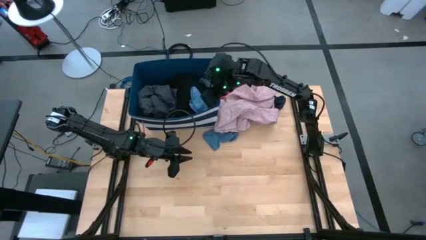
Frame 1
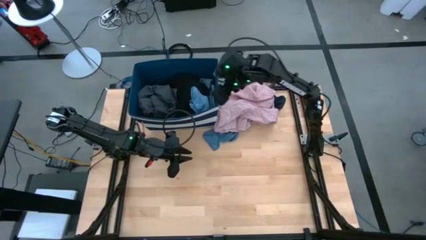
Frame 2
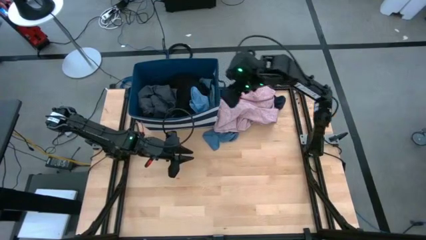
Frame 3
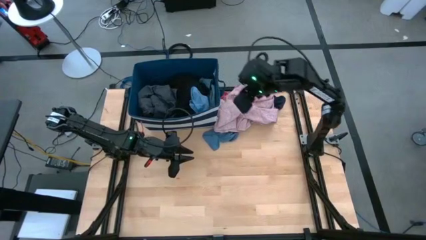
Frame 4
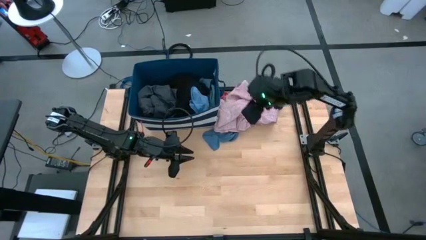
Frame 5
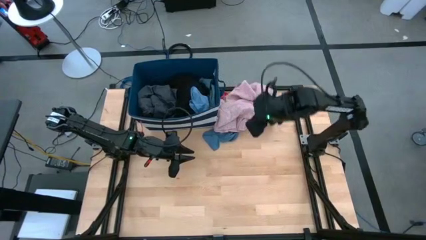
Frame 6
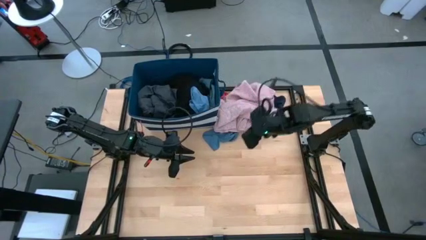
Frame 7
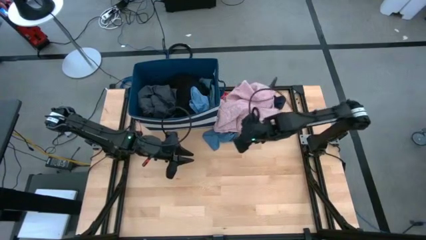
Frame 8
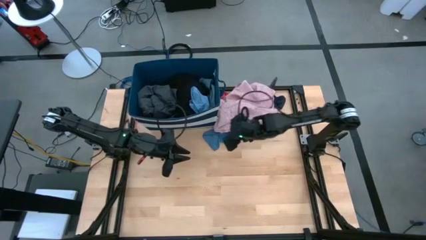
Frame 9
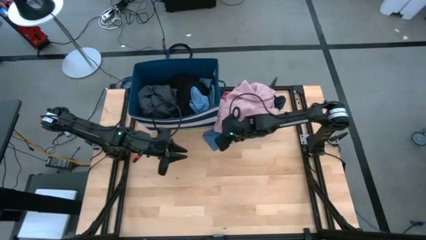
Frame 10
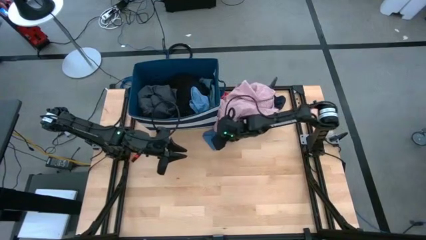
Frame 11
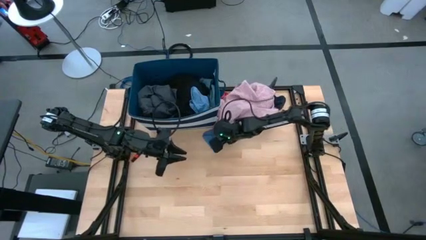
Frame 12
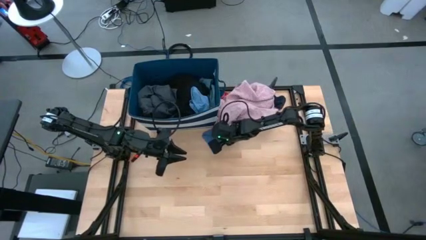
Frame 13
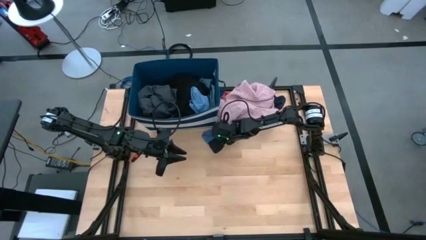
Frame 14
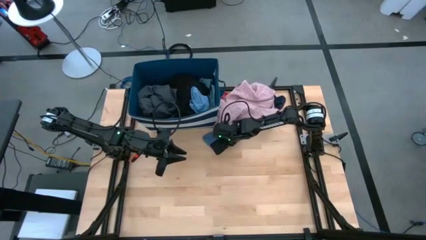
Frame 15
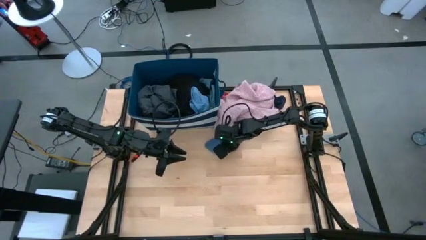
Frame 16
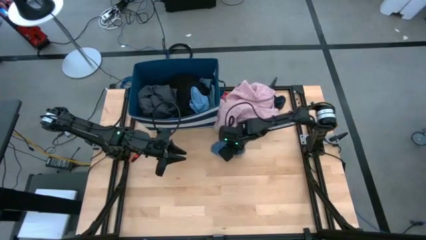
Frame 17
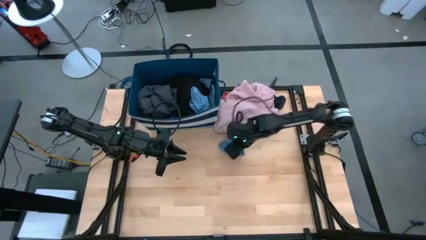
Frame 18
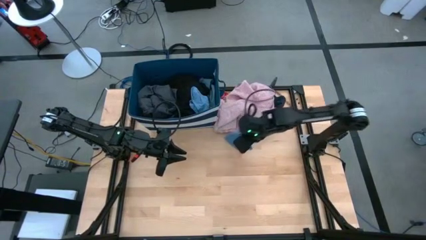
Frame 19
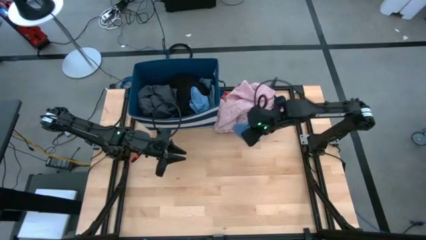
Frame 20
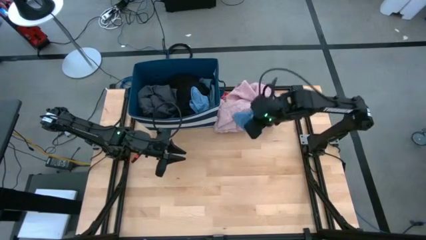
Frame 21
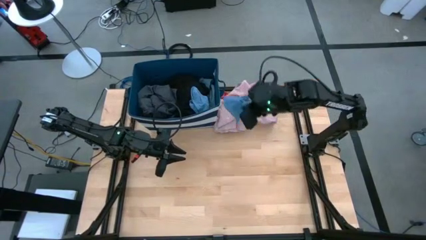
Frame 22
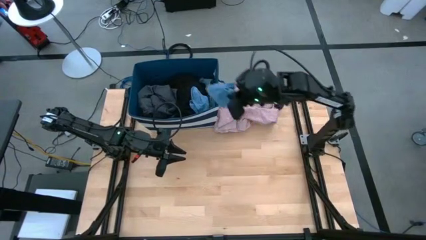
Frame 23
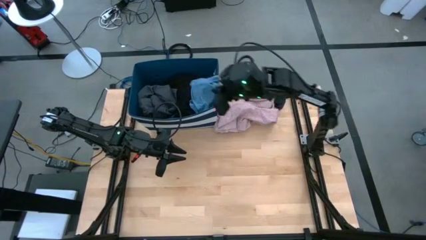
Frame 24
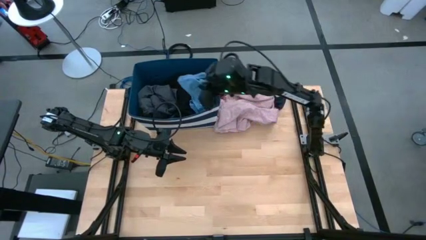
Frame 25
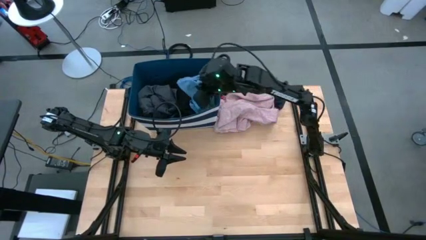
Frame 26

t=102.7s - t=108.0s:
Task: Sort clothes
Put the blue sock into the blue laundry bin

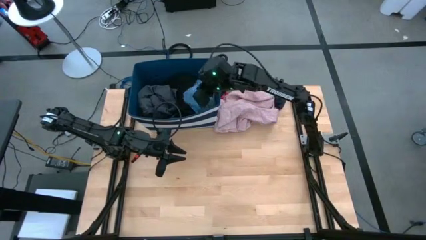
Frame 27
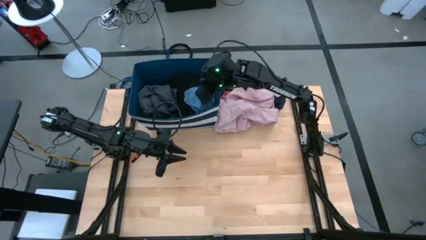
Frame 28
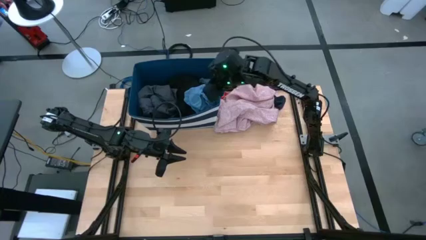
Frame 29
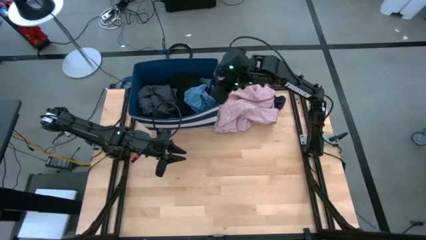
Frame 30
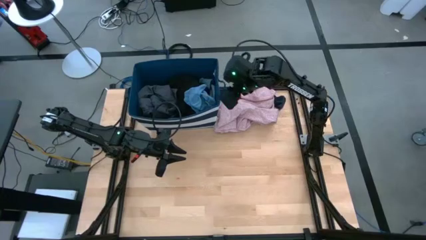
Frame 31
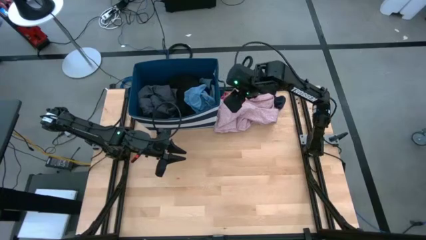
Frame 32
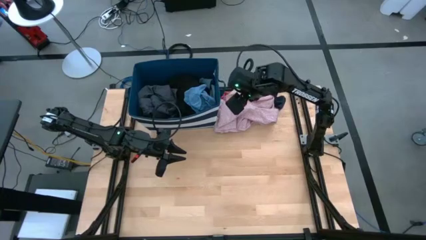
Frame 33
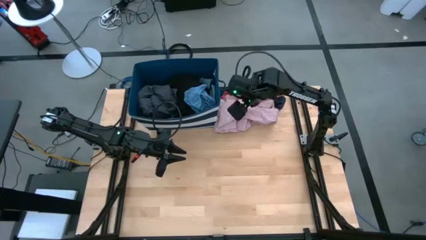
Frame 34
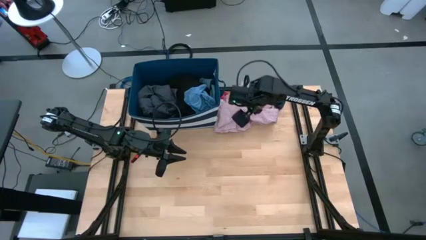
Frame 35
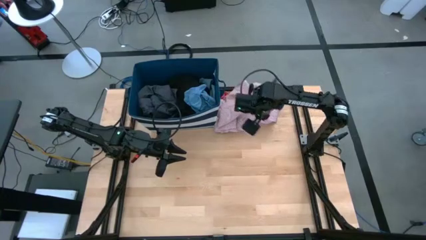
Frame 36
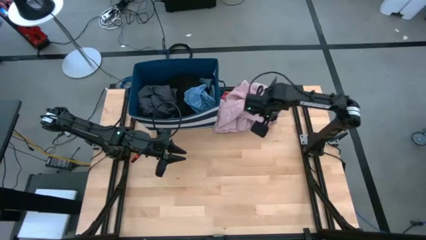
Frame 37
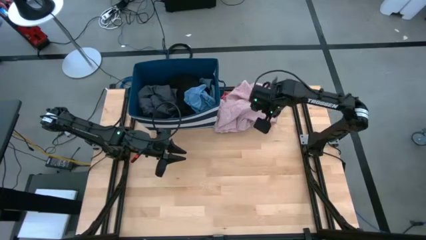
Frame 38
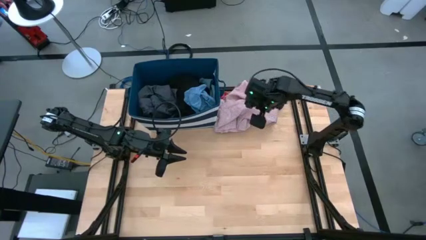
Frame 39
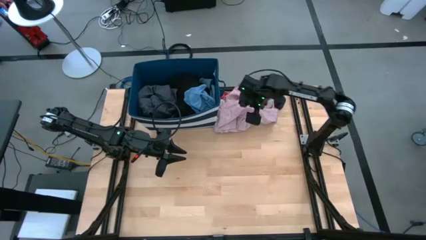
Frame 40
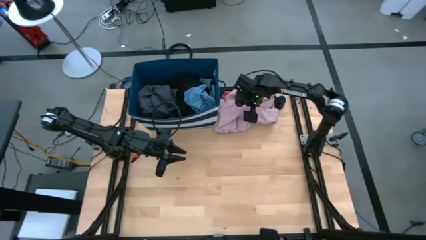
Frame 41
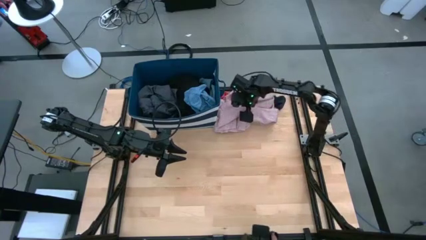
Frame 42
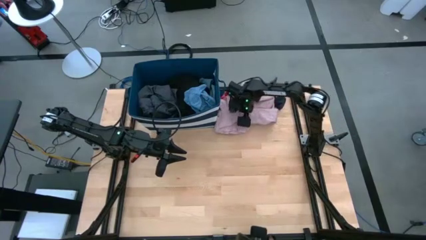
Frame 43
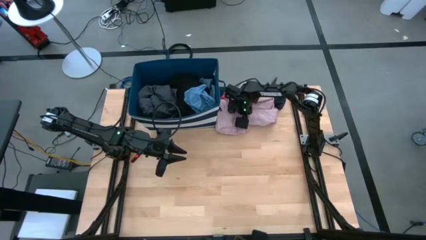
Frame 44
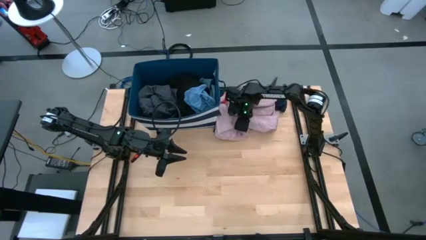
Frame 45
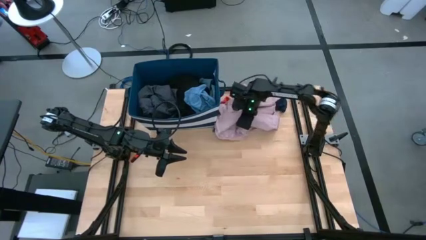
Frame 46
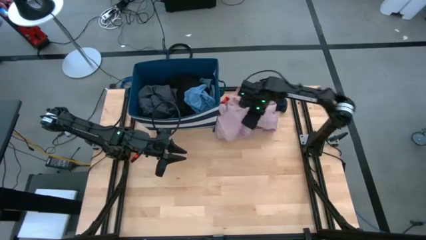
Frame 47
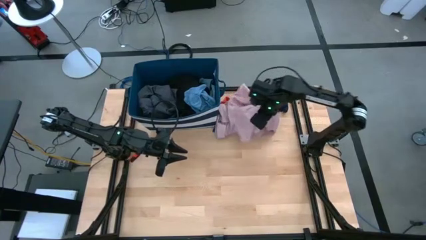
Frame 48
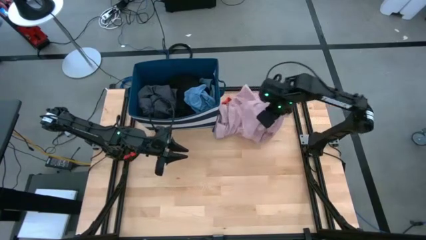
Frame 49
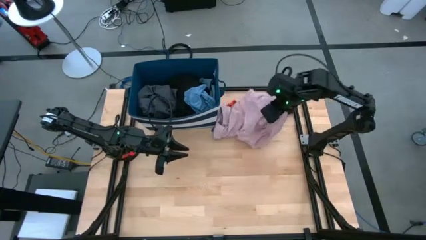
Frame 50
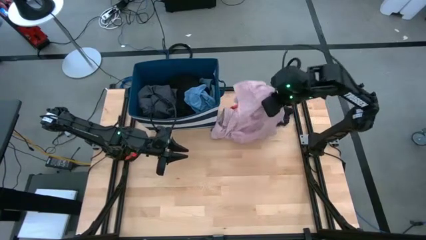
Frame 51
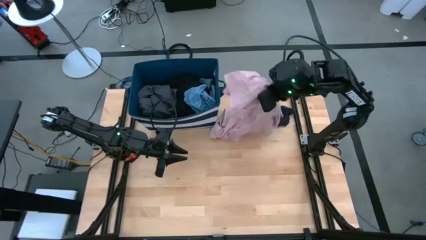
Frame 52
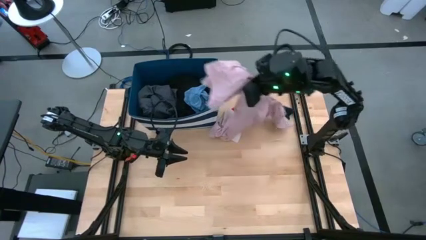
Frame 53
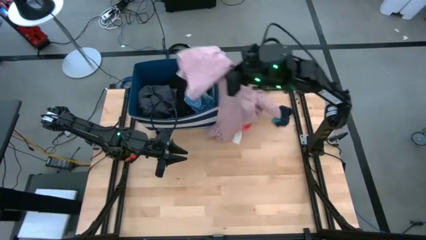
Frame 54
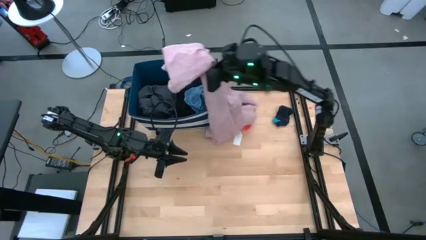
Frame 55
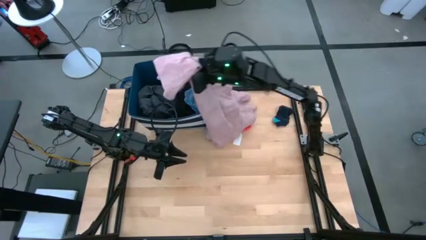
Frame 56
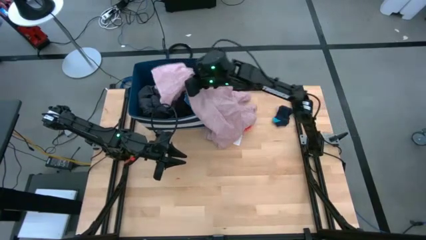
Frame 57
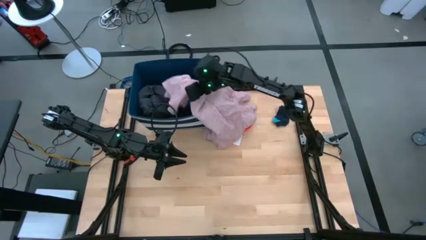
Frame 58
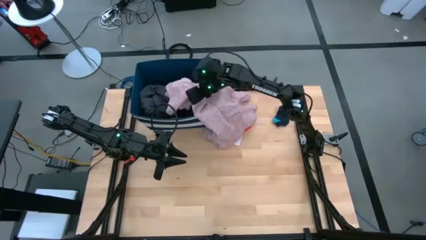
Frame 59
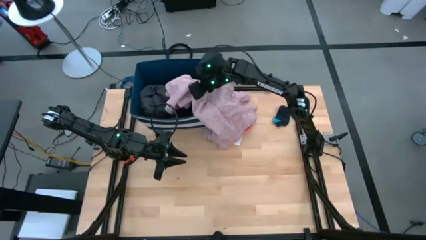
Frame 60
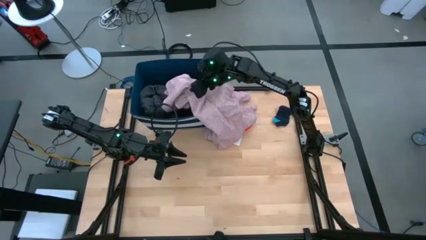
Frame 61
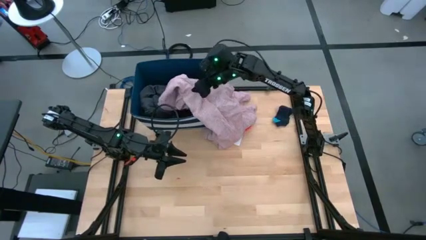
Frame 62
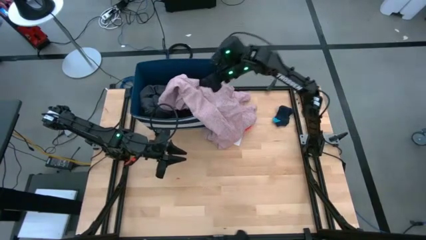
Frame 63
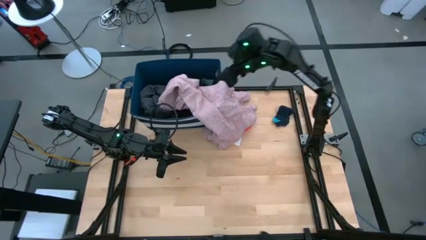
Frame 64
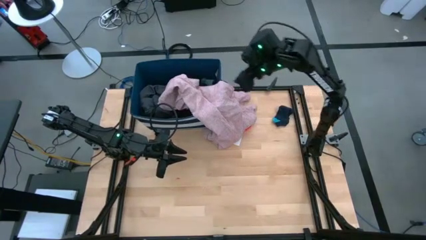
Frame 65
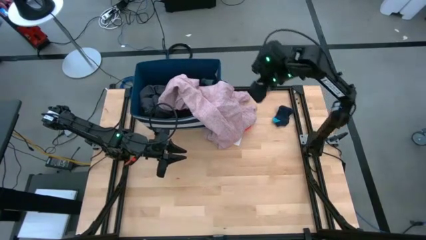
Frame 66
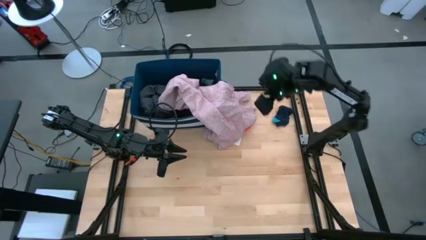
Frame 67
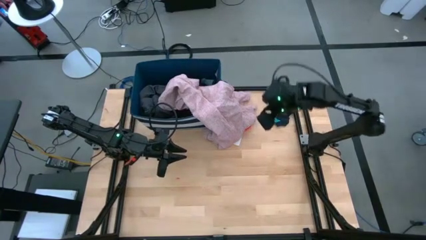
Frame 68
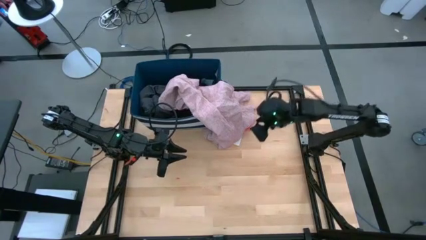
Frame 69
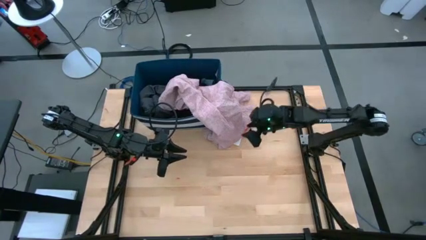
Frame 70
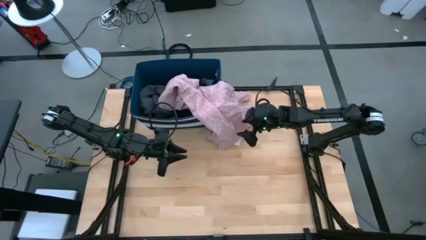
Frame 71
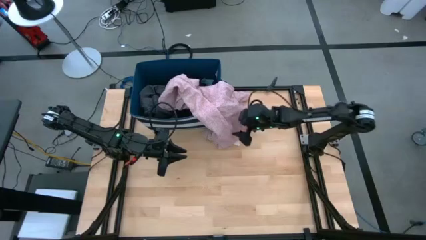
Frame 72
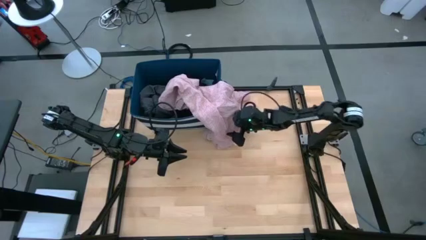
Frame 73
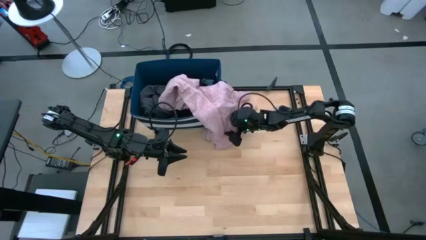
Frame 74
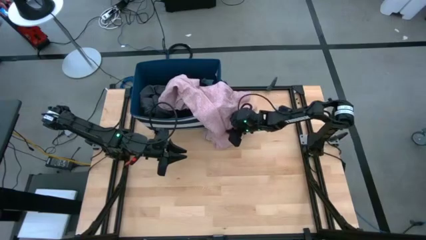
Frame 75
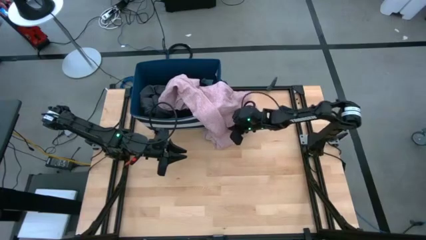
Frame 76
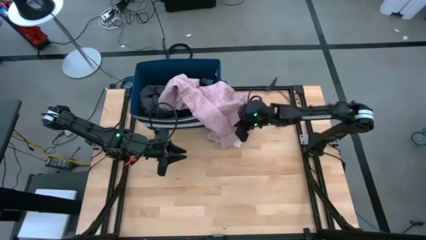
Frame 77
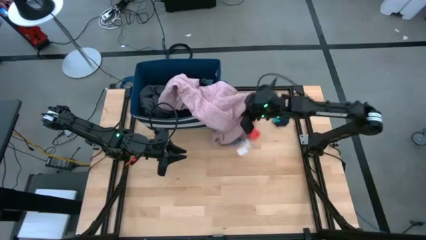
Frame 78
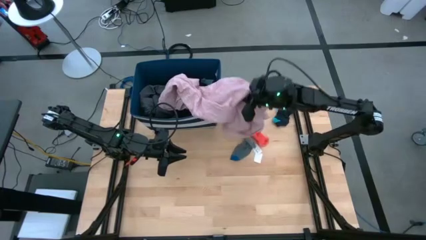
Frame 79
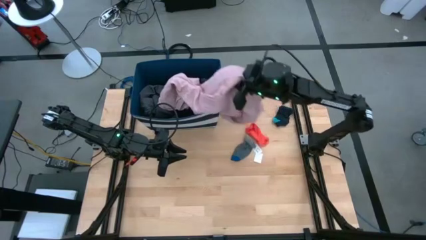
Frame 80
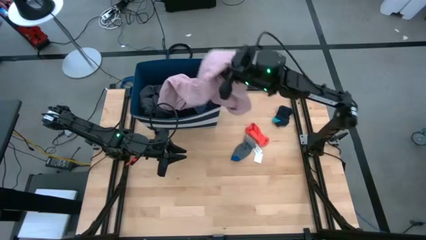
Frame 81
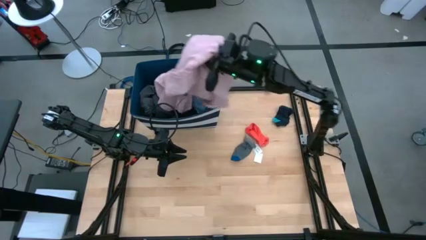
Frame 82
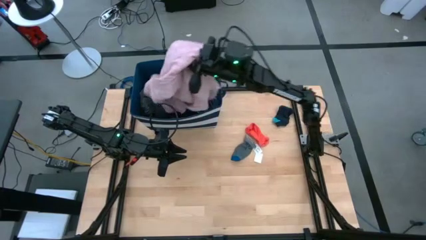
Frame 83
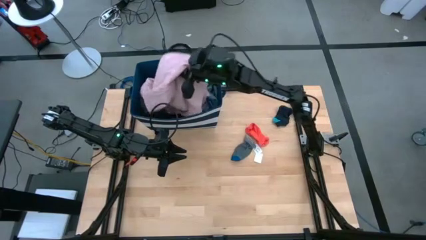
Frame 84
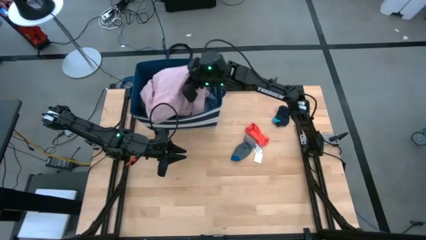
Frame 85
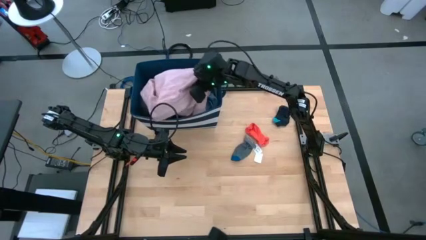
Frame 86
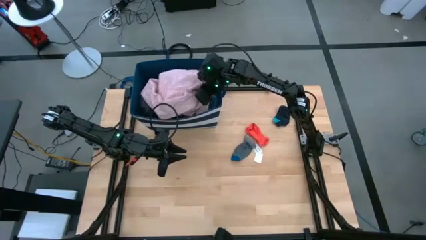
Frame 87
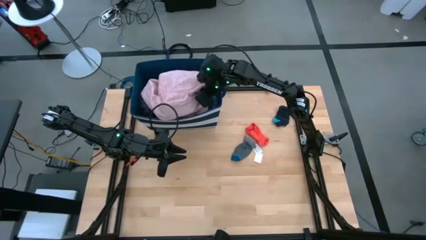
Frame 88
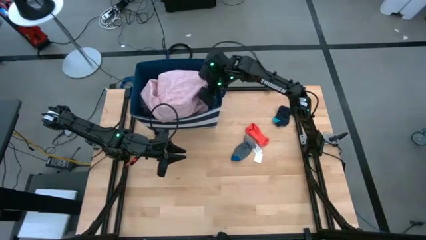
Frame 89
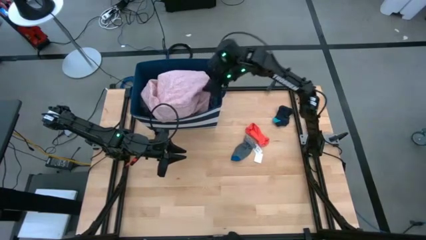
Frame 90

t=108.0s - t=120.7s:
Put the pink shirt into the blue laundry bin
